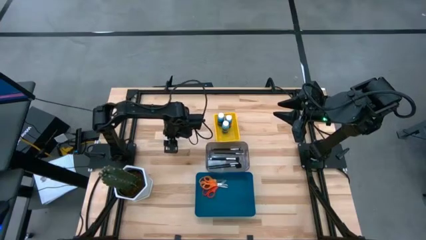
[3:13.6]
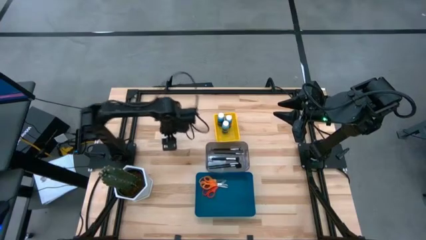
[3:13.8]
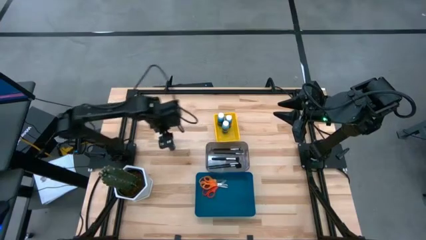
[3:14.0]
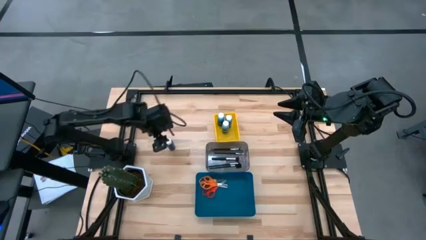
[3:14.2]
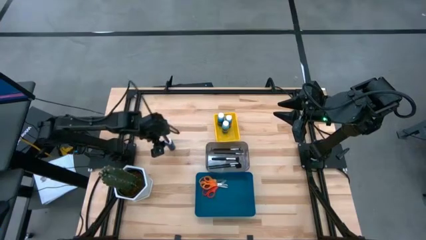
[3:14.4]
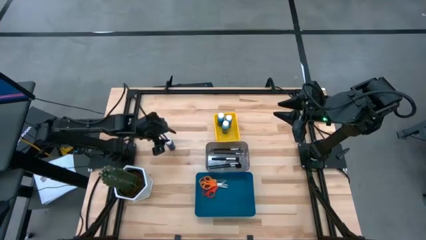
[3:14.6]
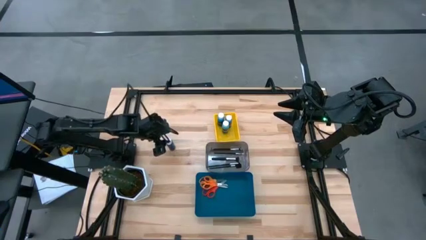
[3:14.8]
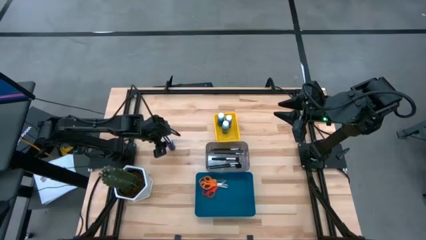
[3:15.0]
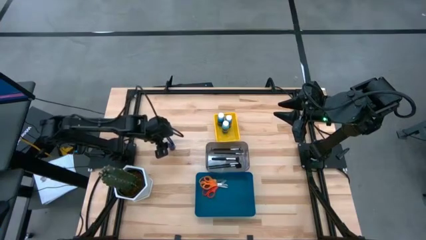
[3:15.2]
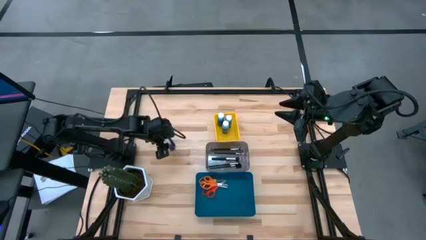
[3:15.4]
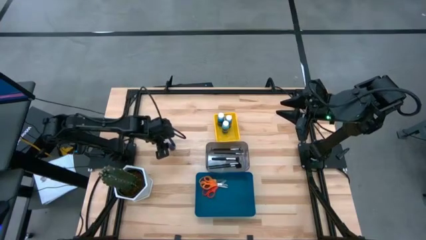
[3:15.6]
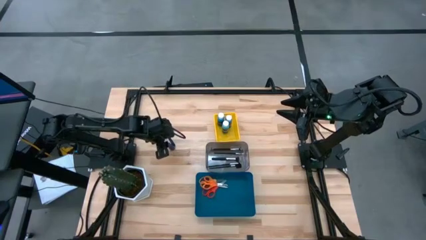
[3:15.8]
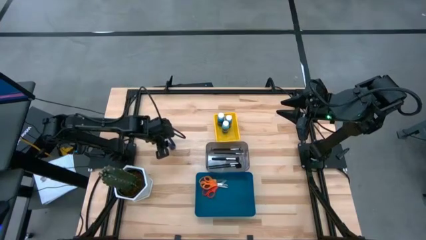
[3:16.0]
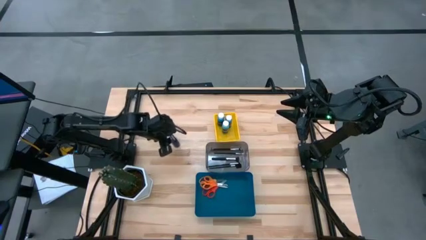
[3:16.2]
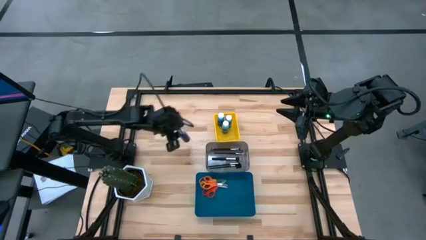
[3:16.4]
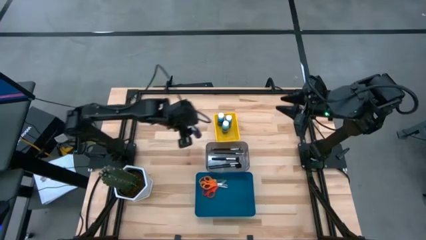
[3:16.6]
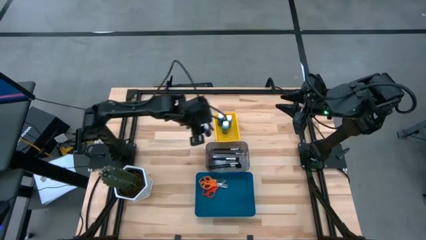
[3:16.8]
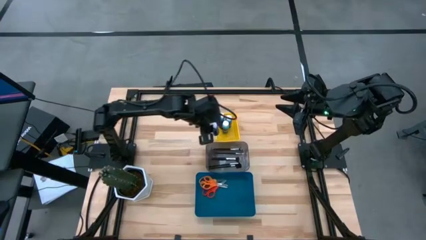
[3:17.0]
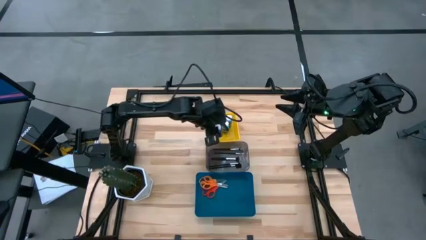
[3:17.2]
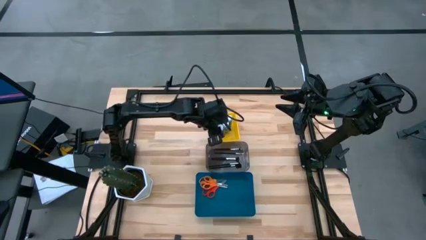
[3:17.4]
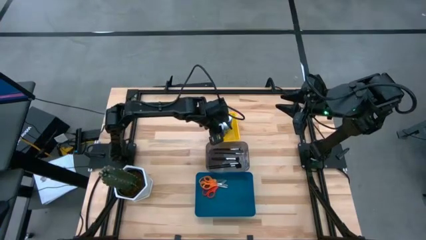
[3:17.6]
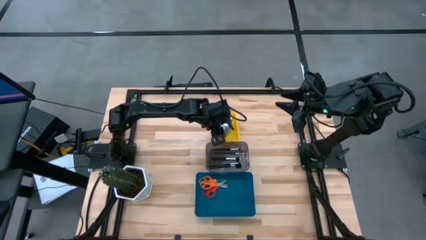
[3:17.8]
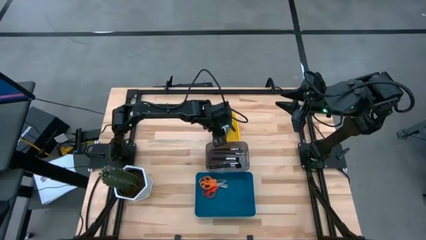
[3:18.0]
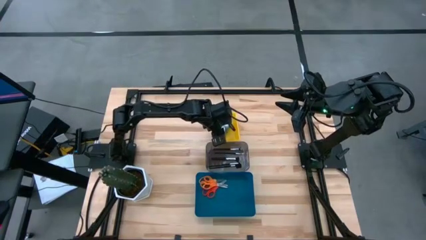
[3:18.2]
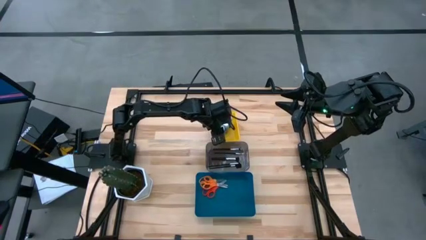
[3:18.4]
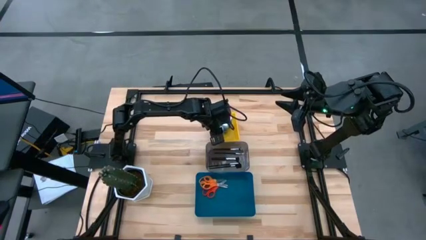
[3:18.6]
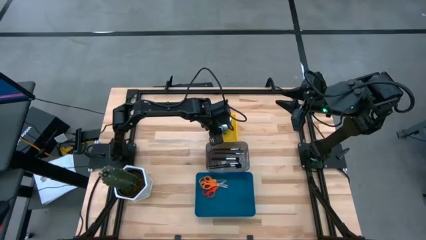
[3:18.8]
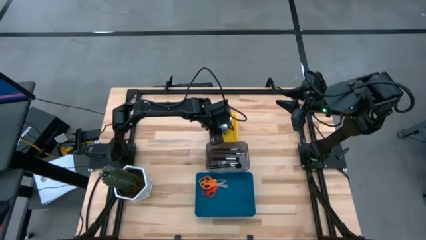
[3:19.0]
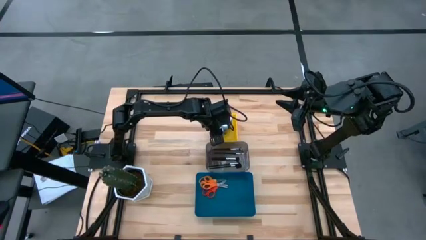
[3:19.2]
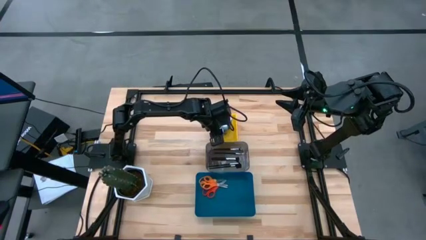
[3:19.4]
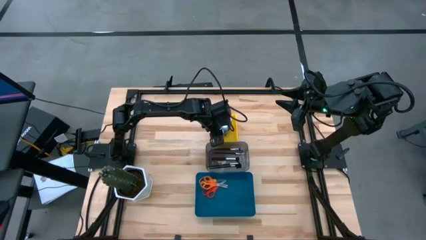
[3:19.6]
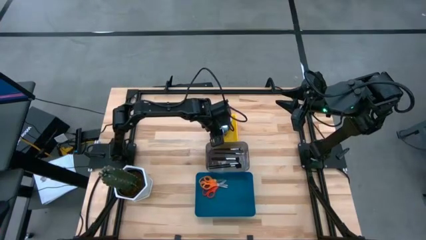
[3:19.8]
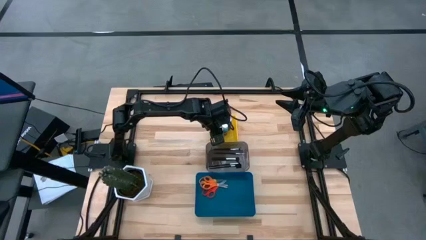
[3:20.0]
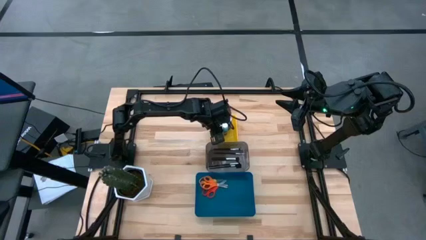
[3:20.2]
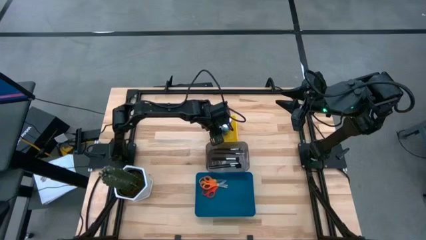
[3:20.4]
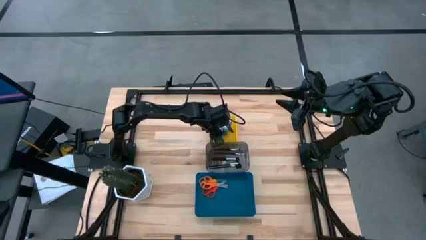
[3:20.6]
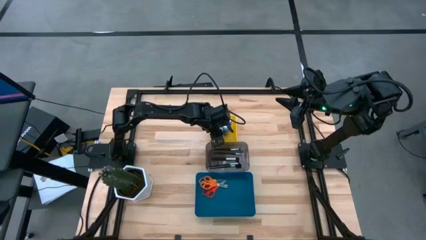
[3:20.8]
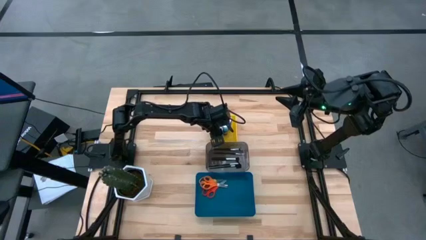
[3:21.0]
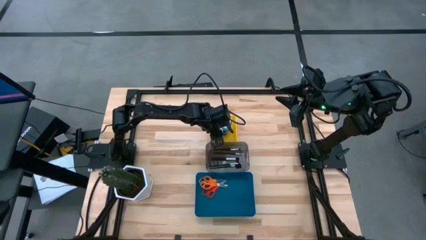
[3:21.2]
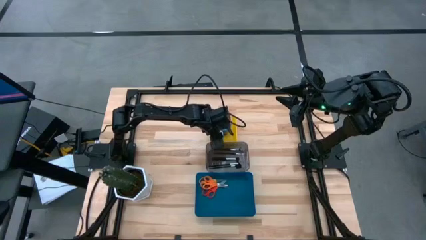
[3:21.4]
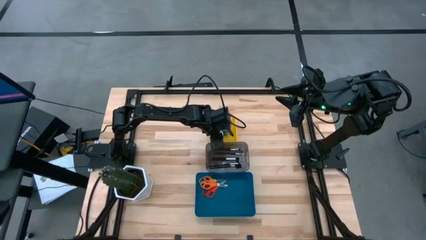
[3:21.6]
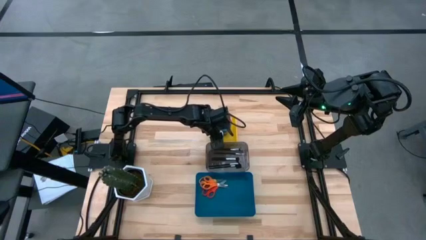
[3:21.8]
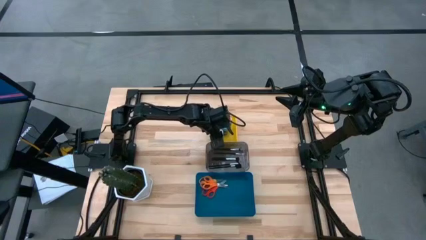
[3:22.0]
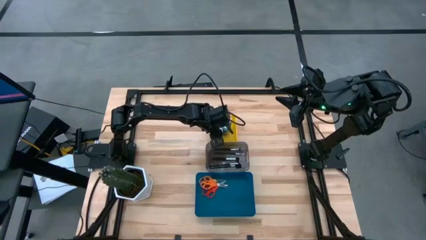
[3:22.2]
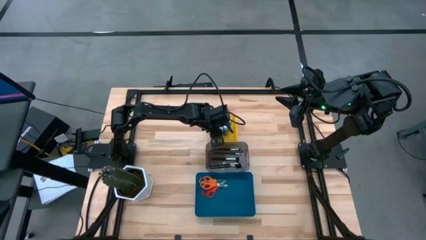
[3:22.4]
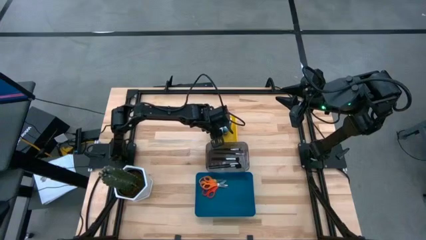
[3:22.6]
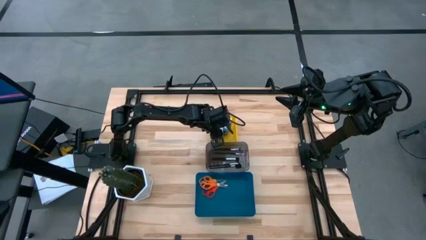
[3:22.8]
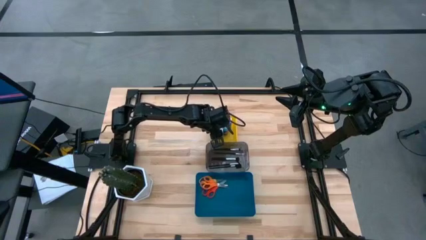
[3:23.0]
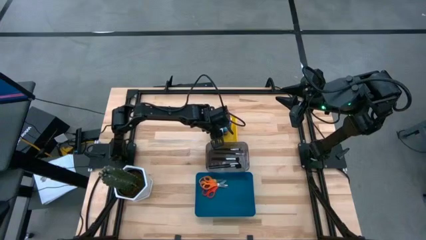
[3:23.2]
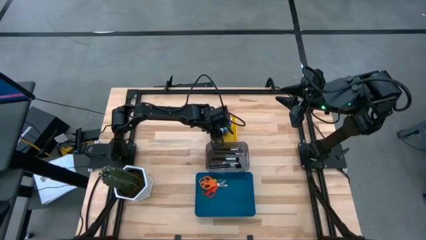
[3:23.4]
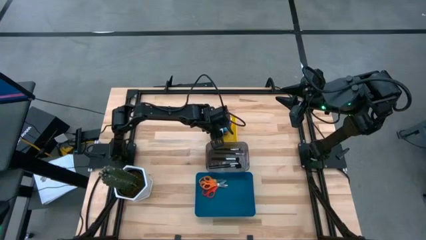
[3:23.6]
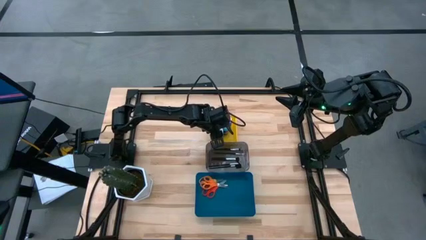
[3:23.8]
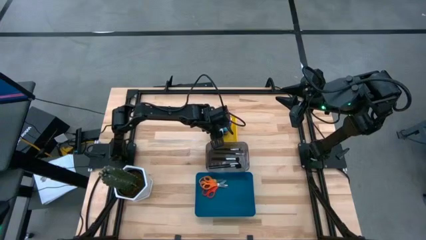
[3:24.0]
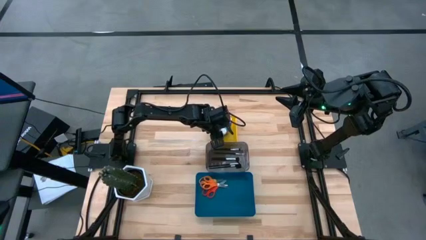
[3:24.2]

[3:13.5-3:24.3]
Task: Pick & Place Paint Supplies
Put the blue paint bottle into the yellow bin
